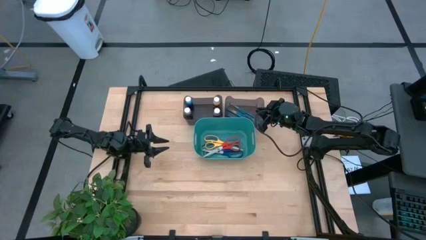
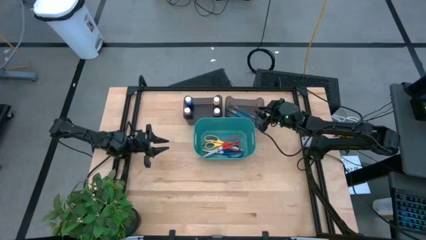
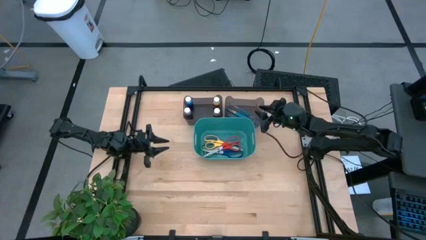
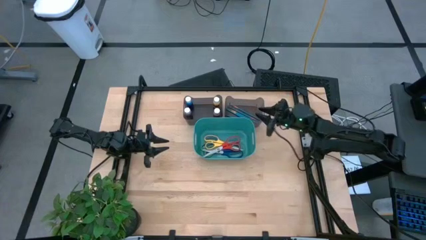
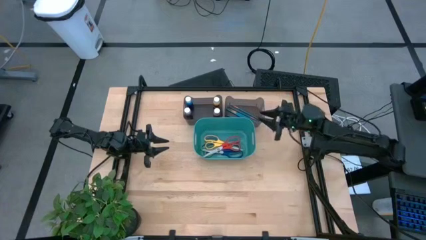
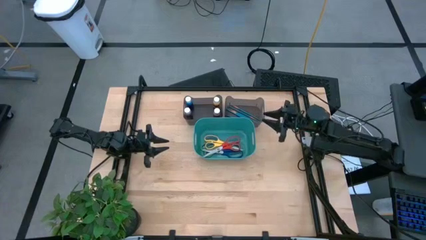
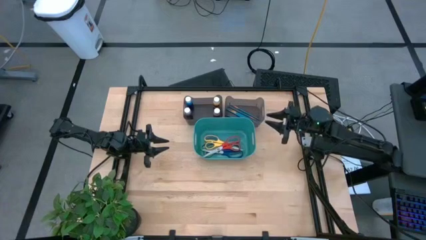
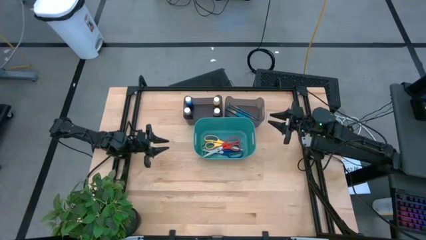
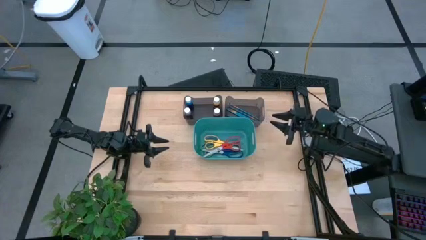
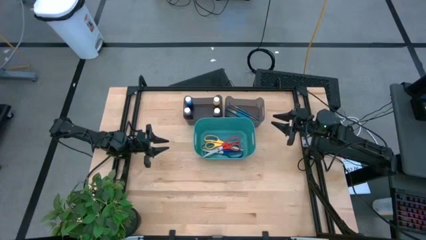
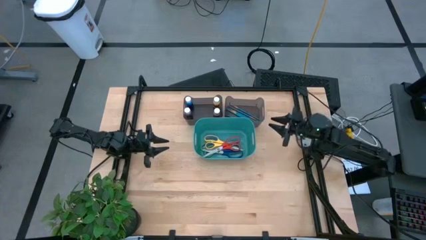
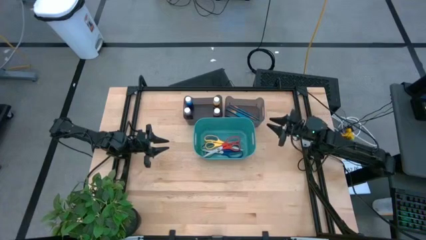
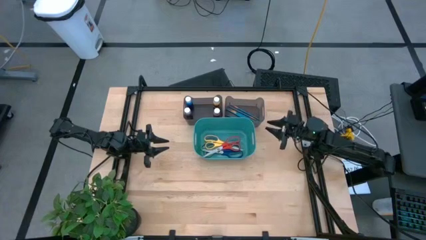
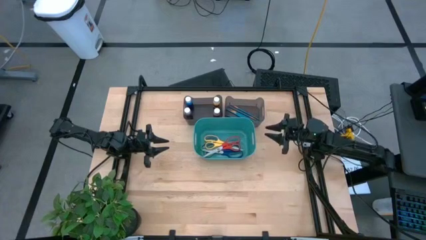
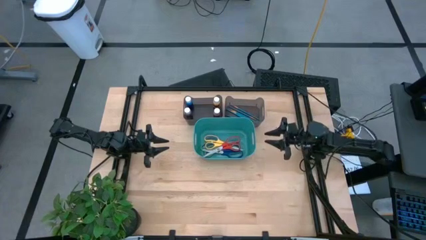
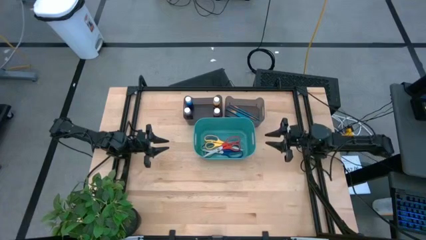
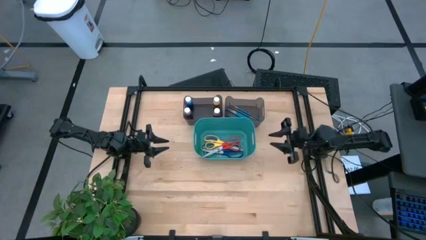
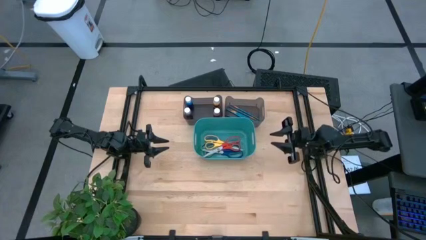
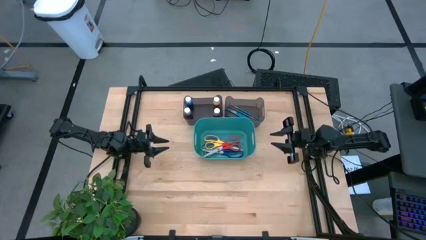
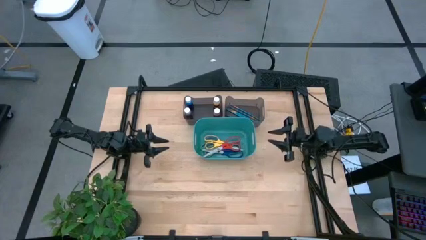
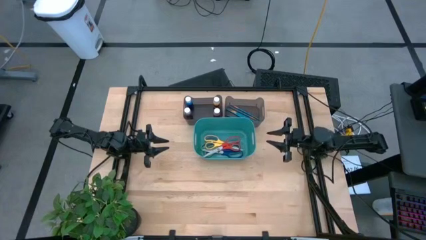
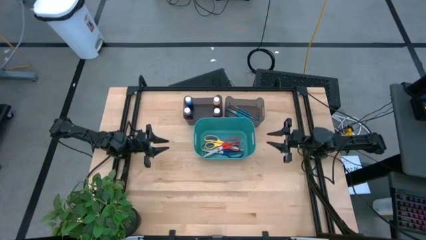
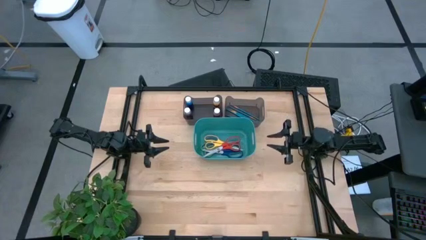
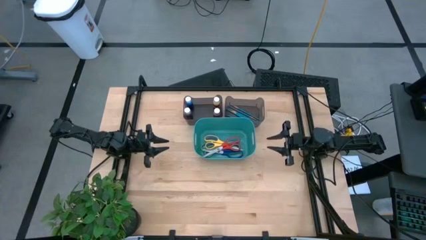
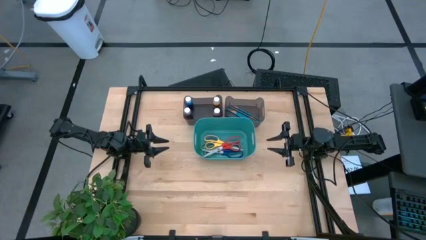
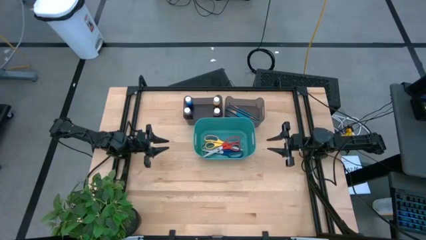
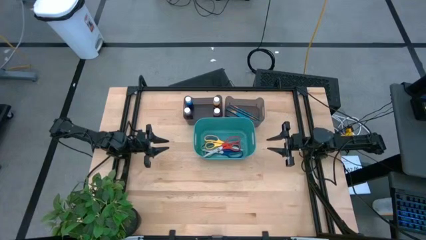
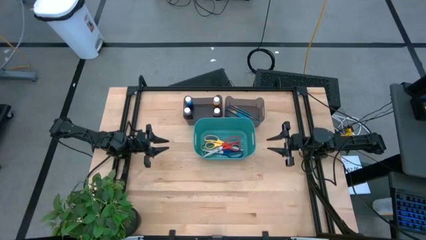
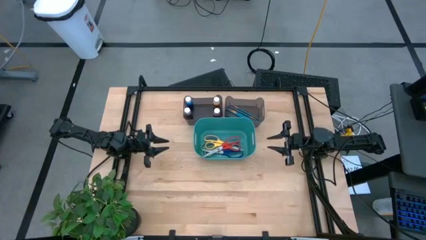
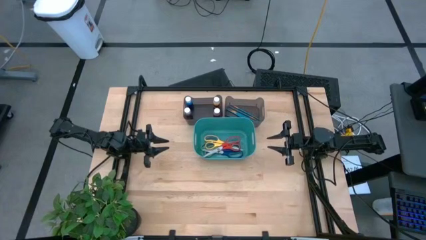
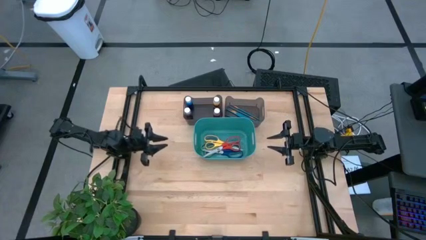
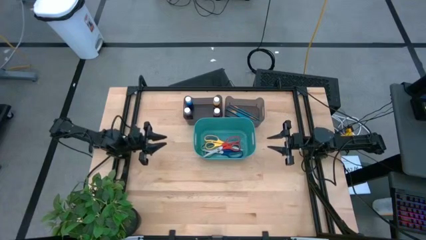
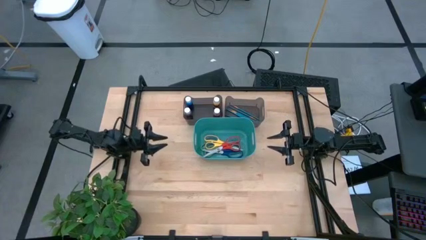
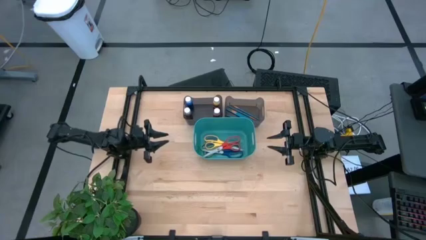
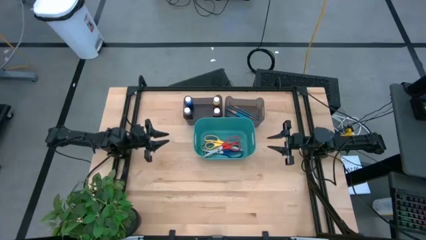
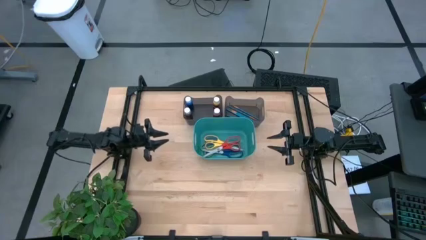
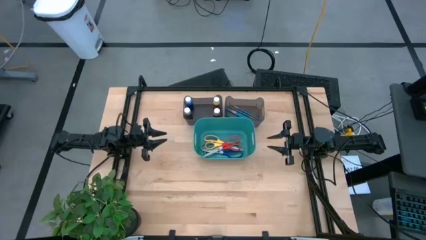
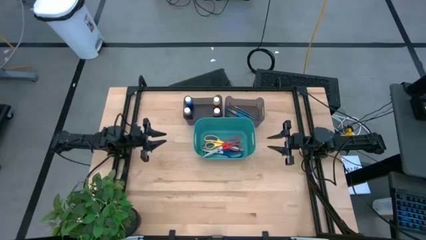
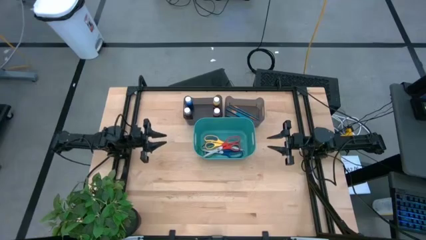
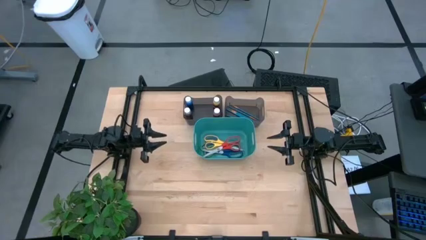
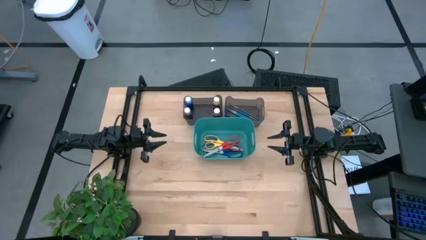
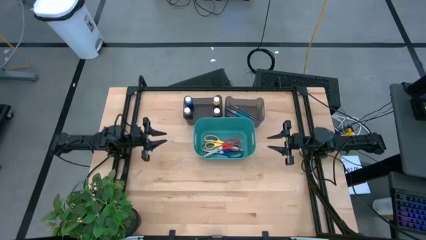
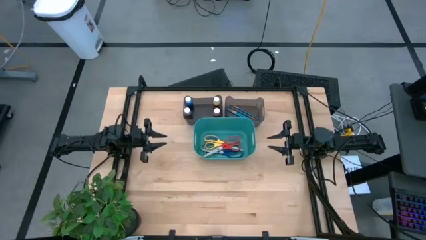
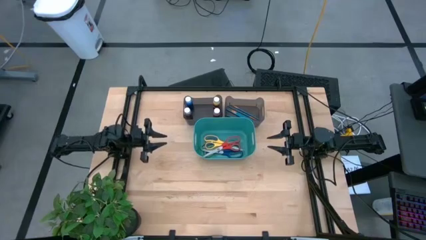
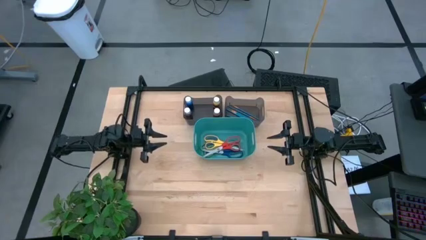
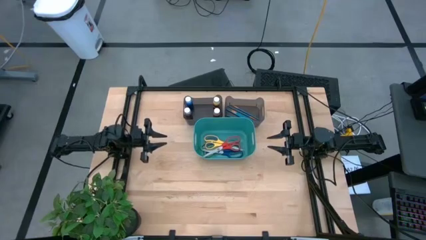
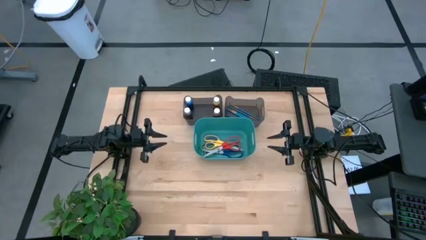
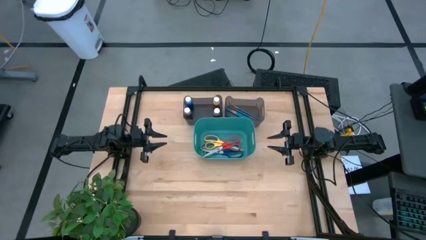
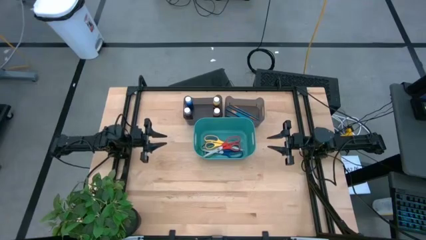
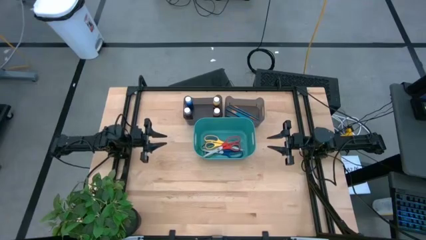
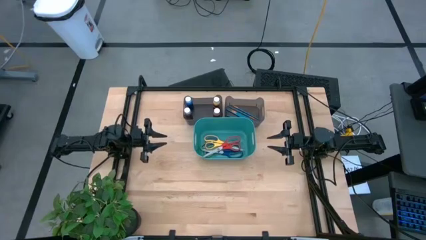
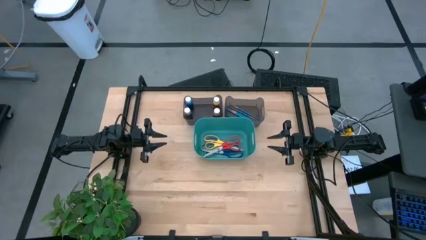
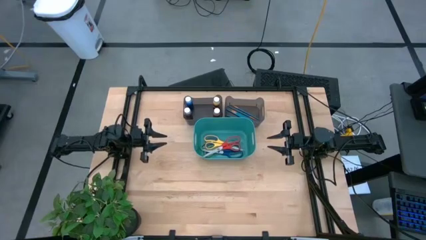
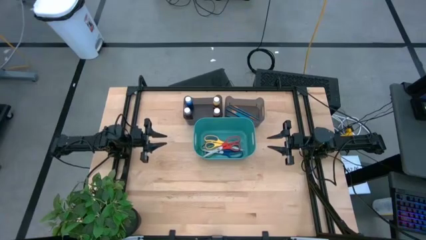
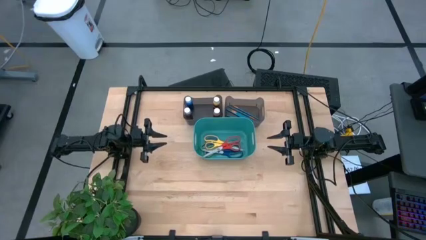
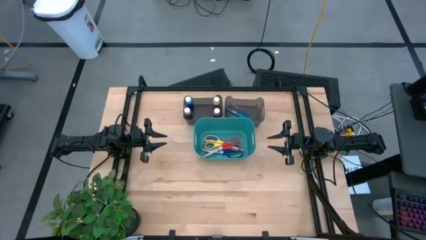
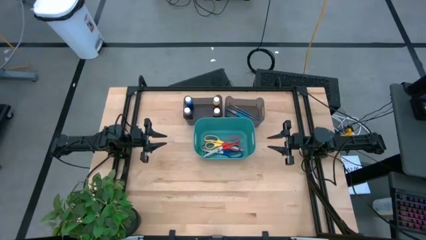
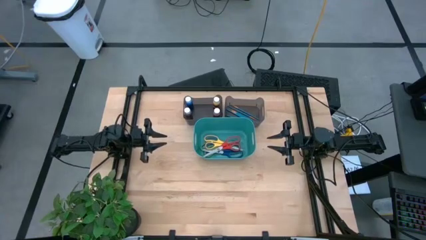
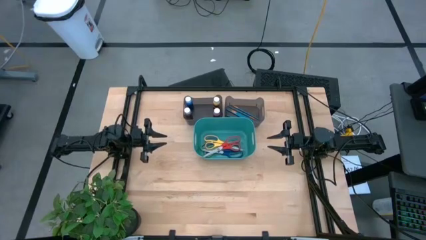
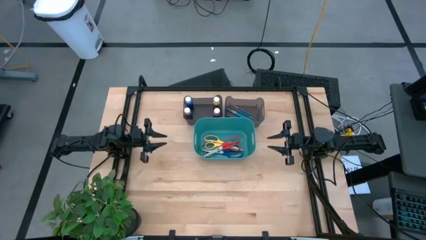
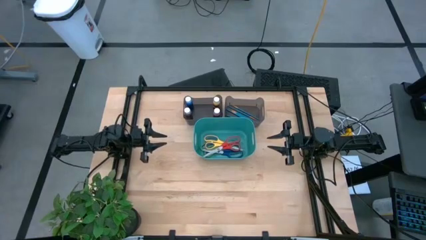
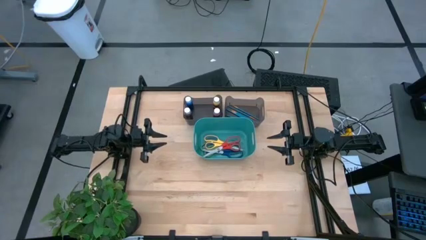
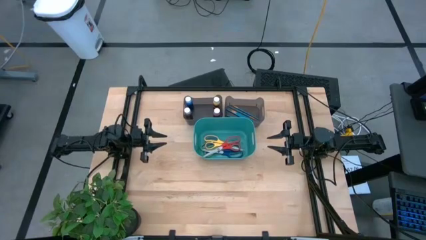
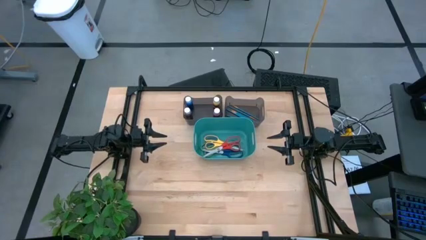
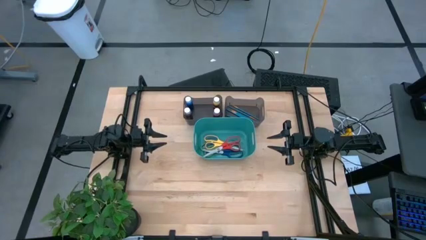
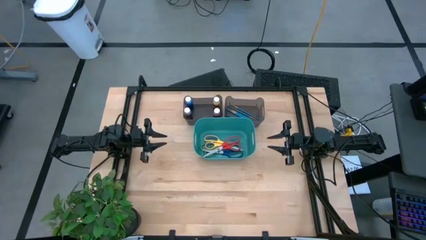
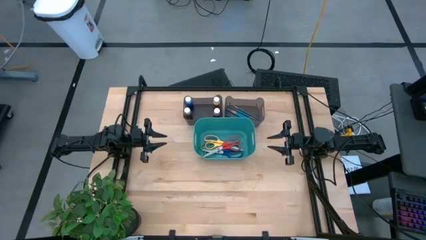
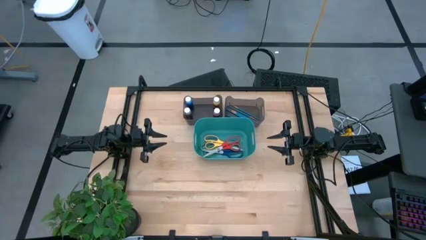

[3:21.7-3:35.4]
Task: Pick & Place Paint Supplies
Return to home position

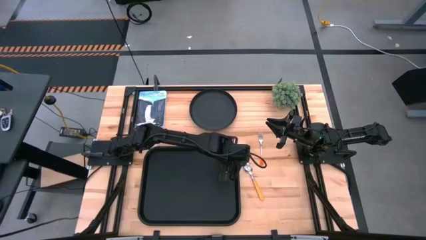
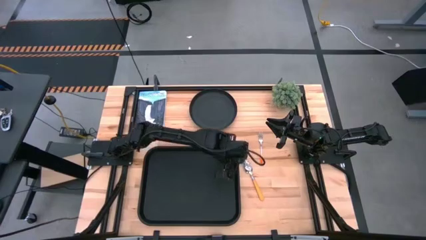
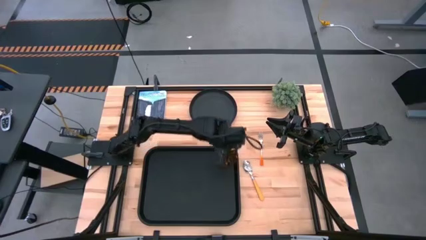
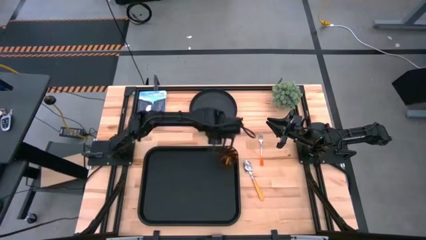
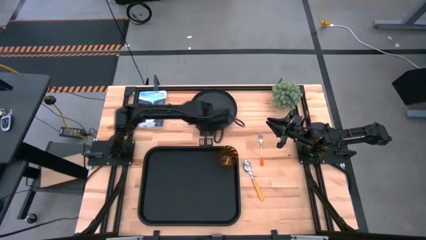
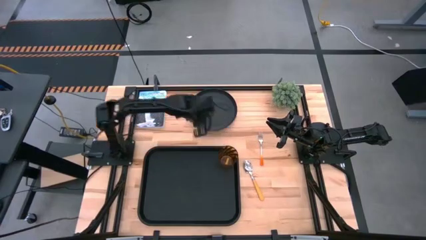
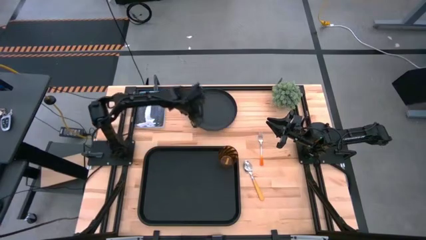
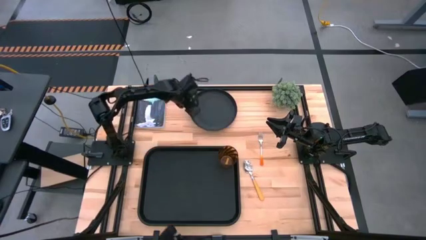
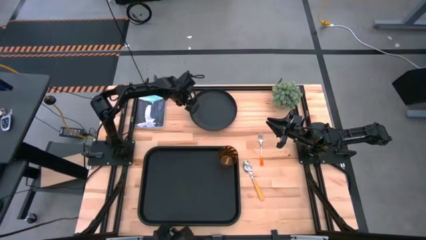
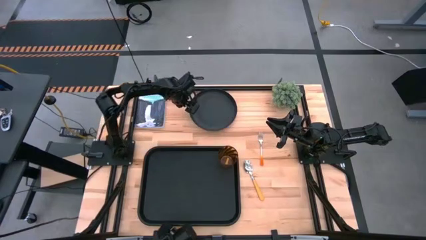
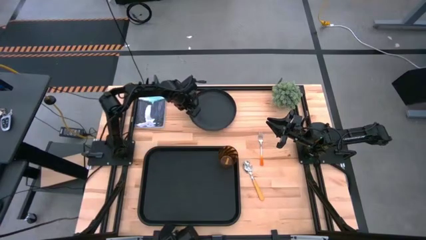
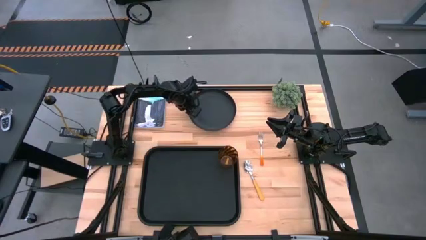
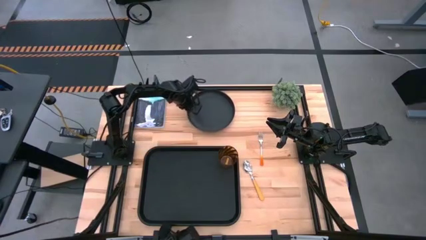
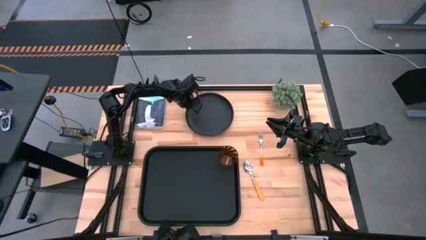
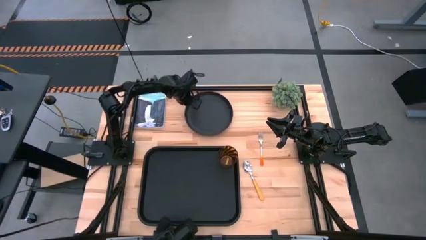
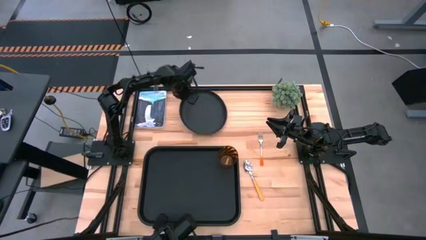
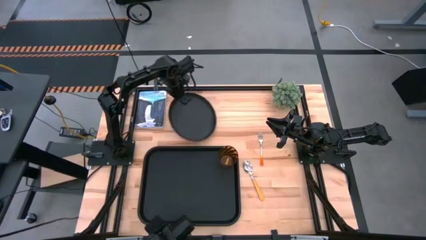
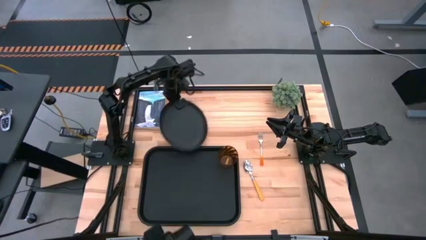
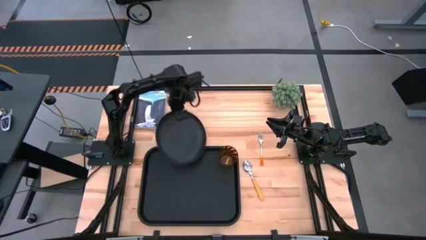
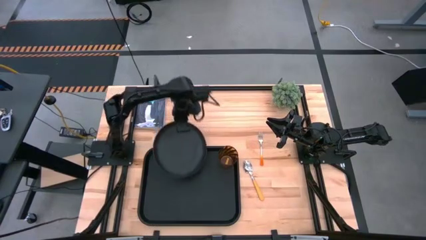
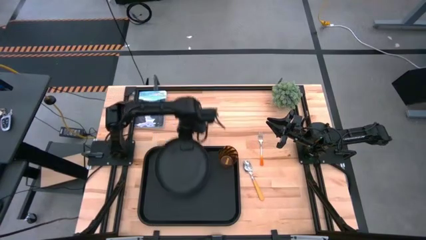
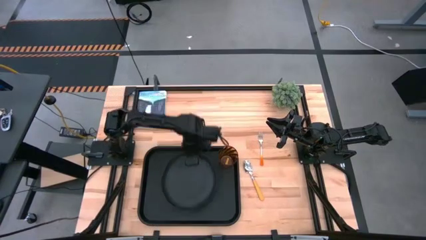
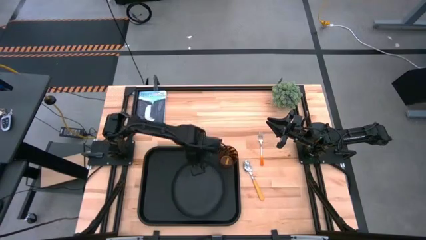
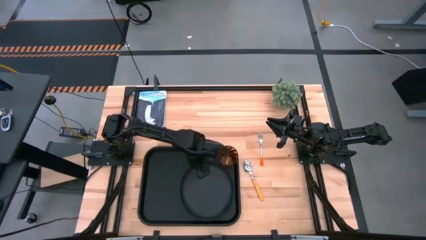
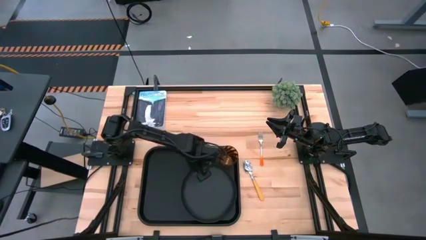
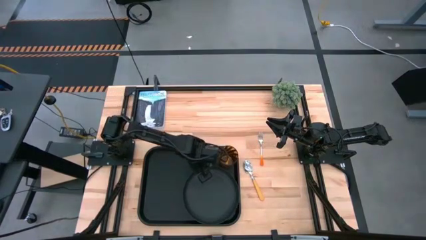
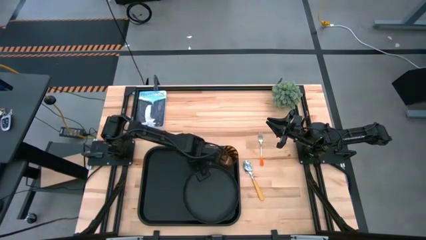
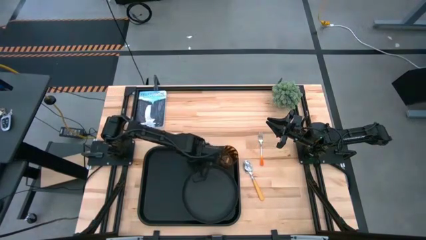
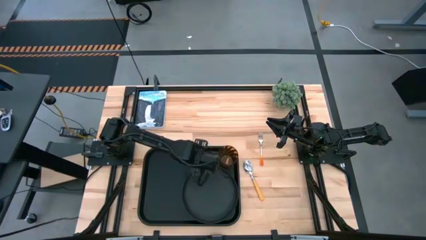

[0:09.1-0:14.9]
Task: Pick and place plate/cup/fork/spoon on tray
Put the black plate to the bottom of the brown cup on the black tray
